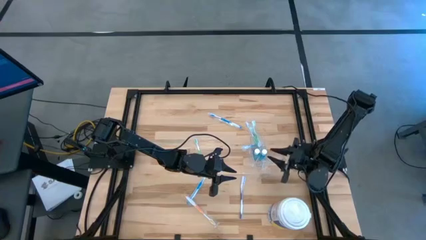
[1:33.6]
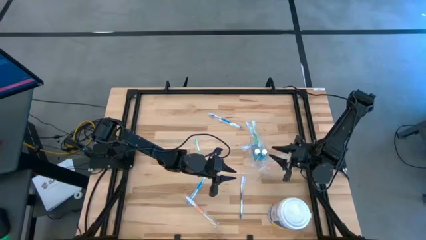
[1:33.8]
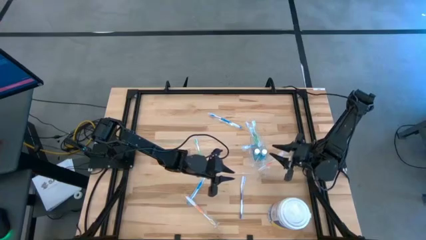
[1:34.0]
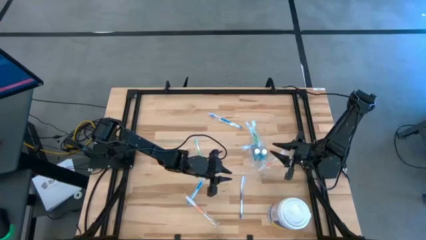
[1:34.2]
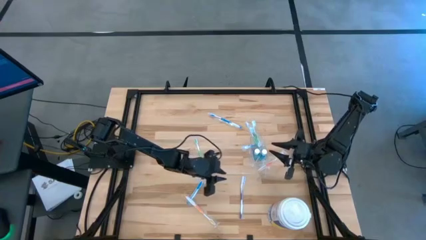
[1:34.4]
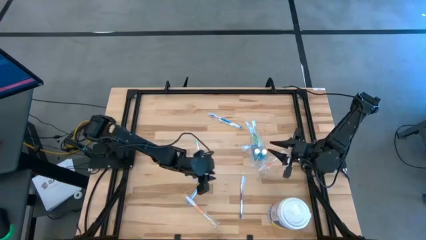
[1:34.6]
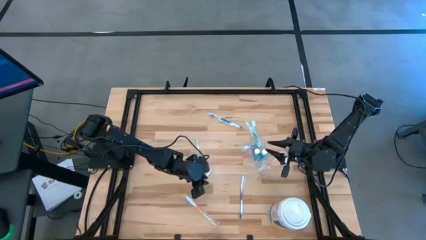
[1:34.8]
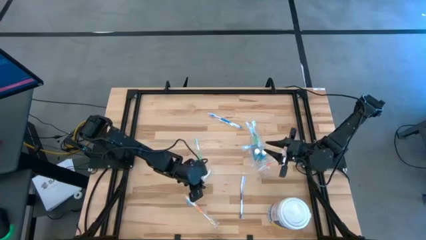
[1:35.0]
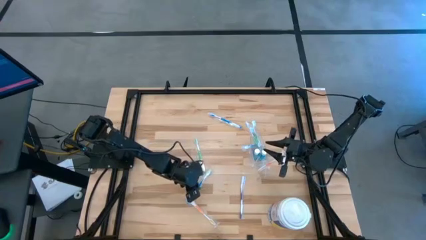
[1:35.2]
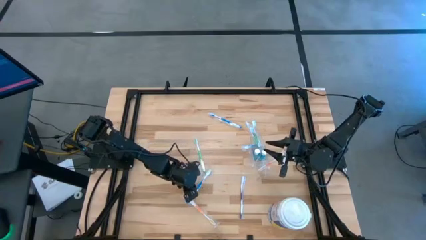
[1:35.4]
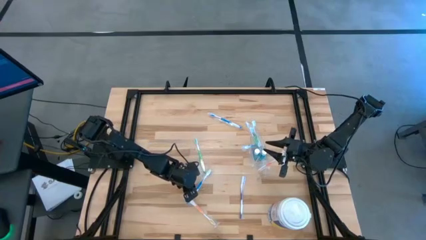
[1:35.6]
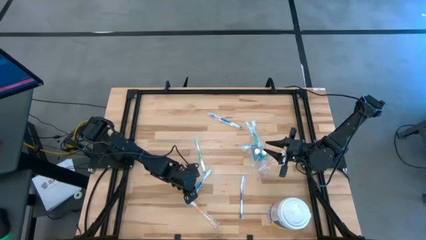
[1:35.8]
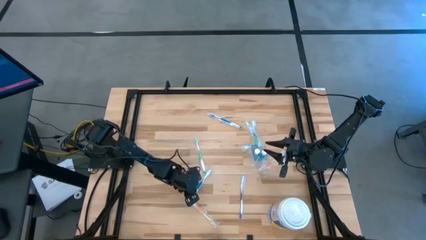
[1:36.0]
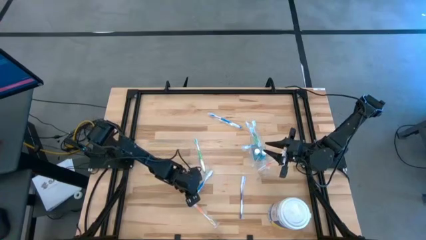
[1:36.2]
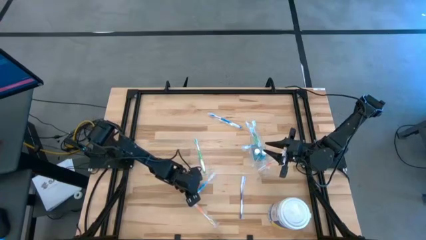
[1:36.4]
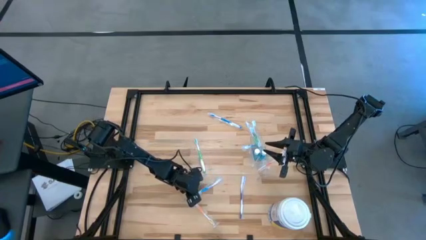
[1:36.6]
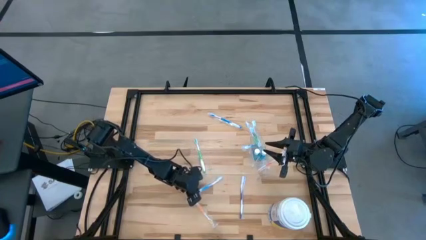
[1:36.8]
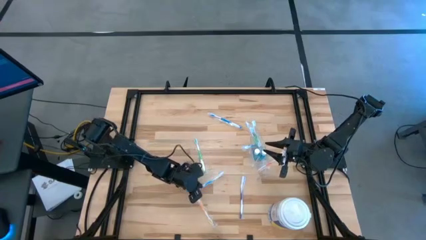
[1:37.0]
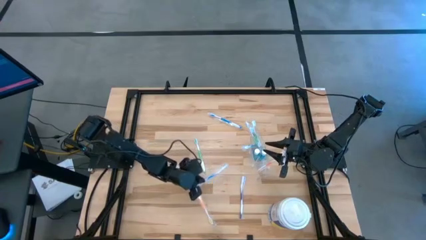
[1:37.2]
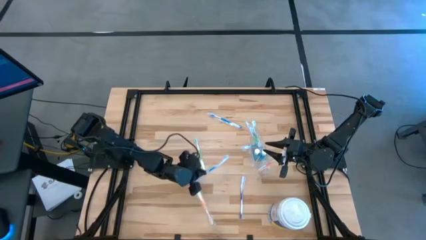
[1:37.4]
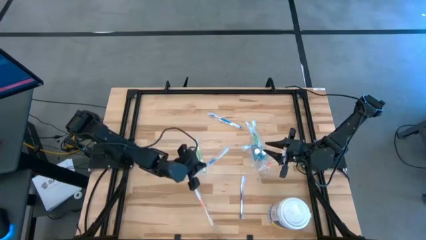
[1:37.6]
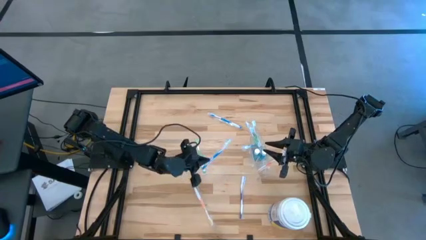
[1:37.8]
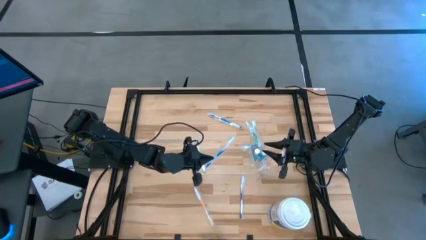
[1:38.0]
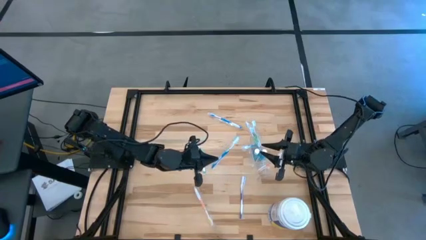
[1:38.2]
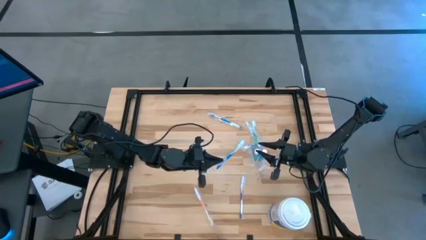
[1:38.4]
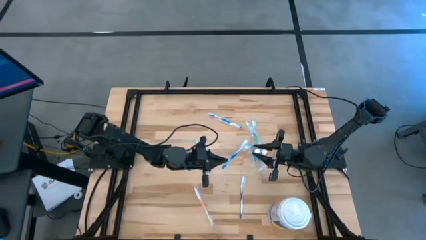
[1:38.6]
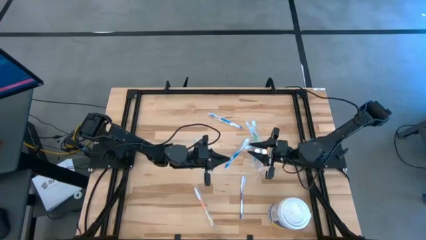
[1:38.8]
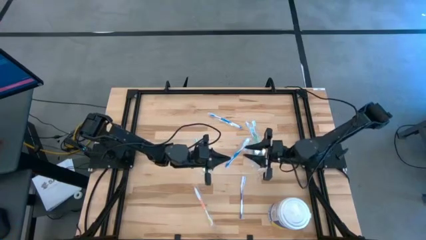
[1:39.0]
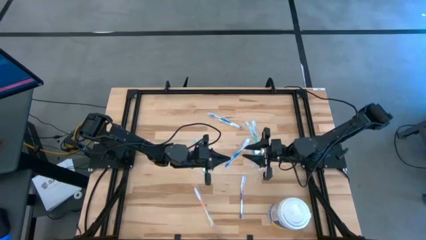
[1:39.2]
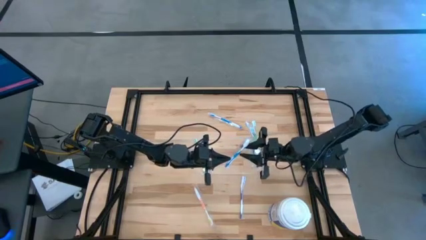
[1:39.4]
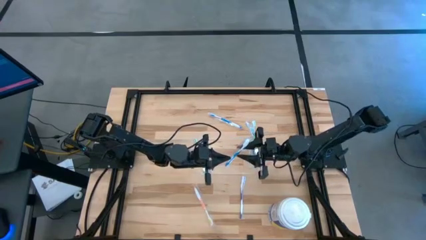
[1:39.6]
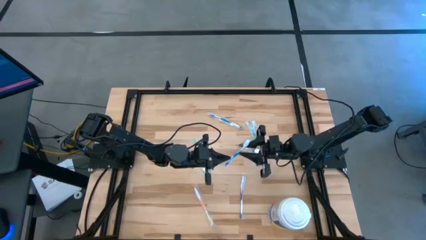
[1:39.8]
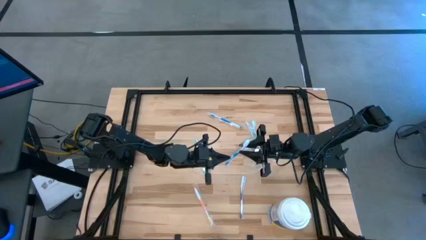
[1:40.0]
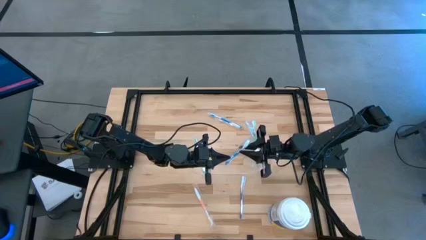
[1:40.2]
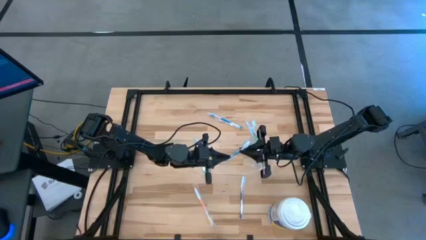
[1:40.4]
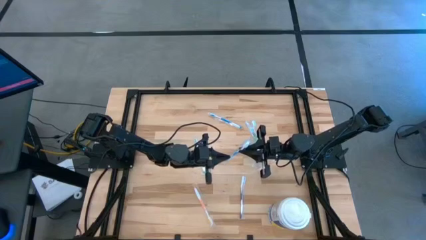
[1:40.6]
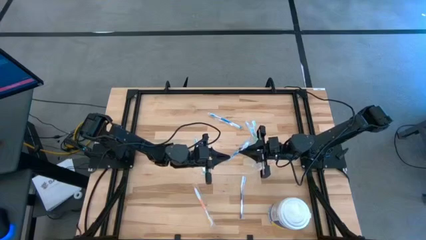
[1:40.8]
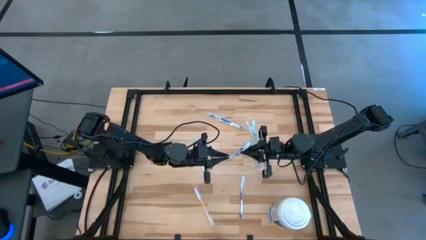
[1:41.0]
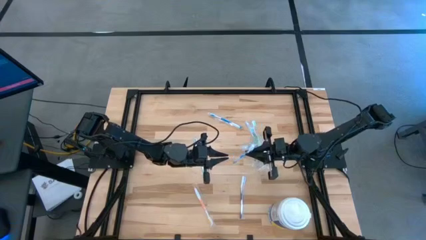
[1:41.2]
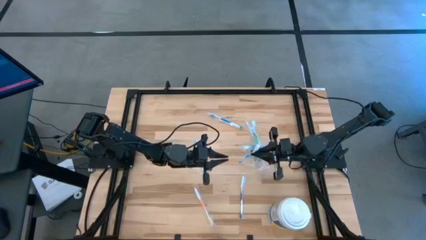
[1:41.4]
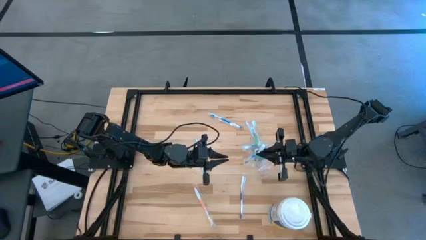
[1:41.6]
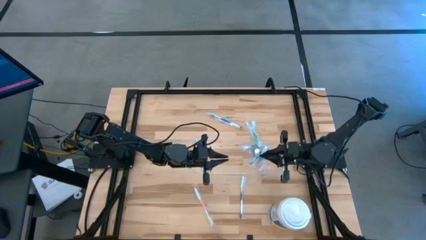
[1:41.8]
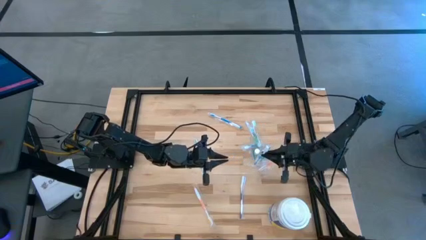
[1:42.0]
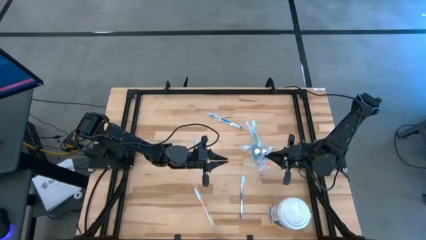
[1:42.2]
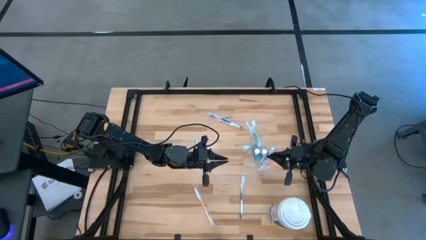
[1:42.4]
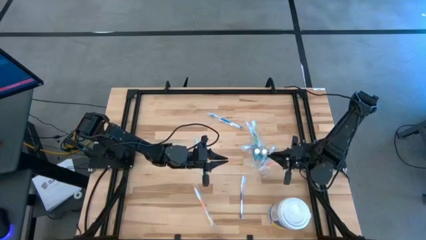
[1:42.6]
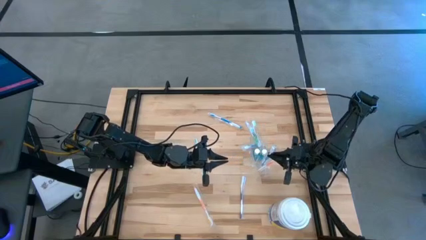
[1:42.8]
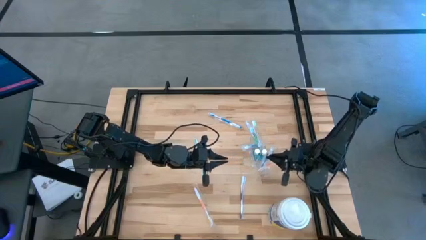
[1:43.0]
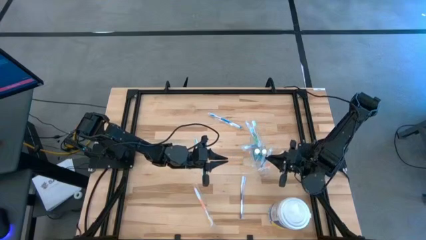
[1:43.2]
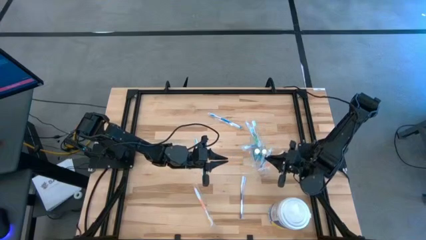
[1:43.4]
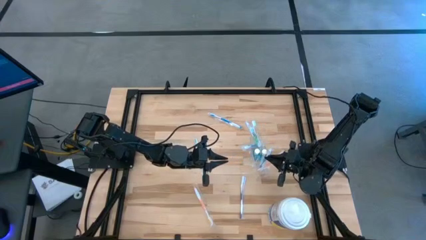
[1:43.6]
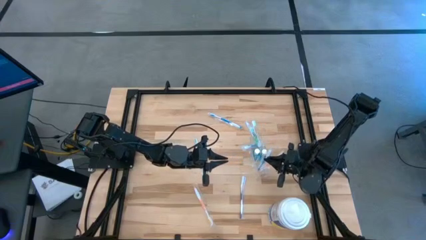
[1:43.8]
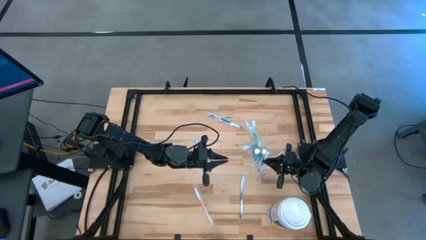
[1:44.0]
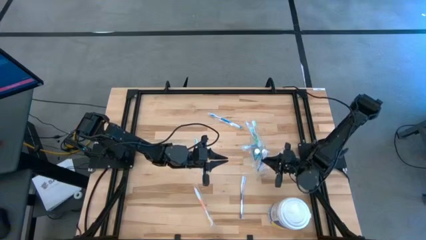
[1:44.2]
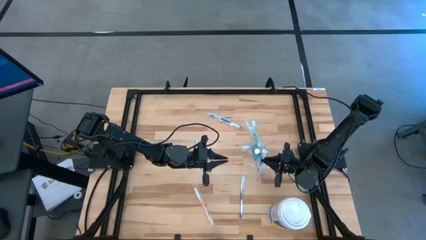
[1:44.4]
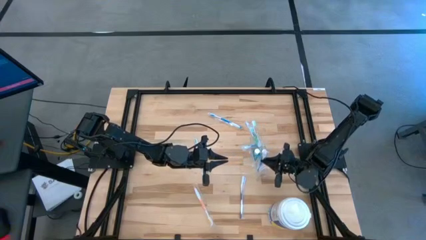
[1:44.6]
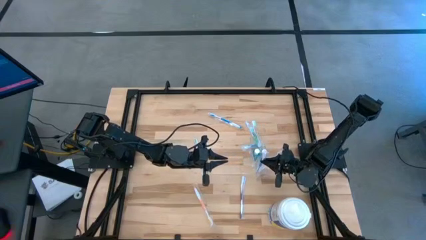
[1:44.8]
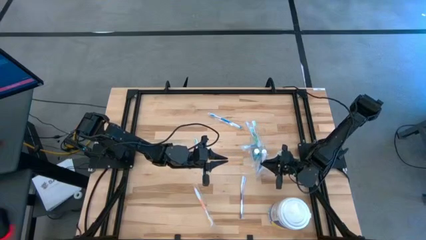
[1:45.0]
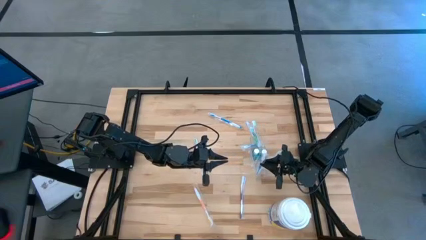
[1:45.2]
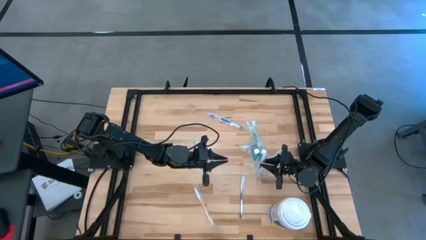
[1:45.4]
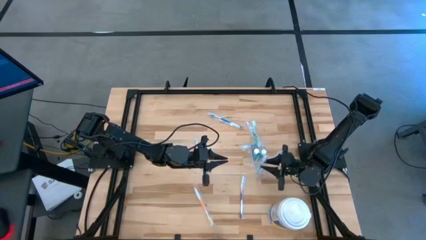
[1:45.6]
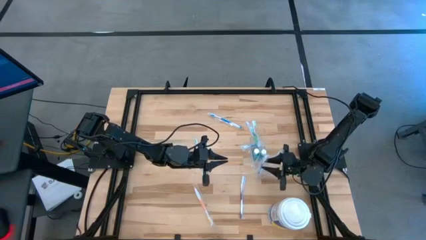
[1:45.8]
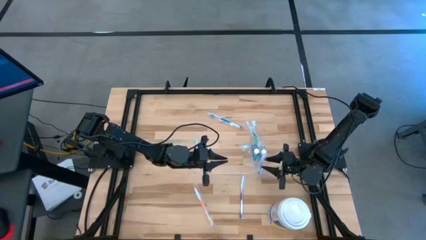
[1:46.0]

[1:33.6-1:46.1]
Task: Pick & Place toothbrushing station
Put the bottom blue toothbrush into the transparent organizer
